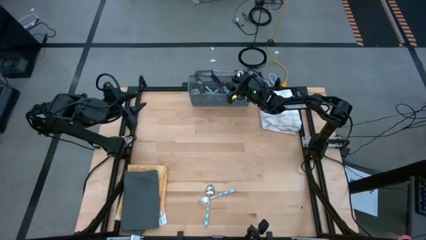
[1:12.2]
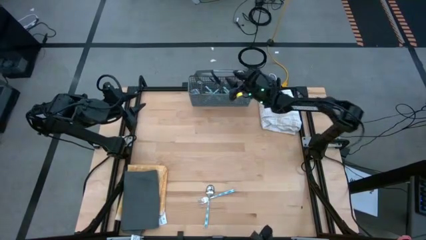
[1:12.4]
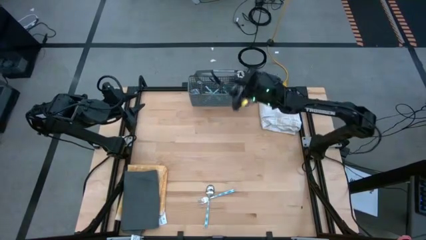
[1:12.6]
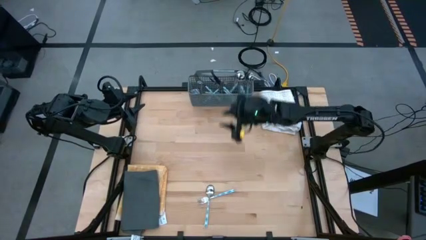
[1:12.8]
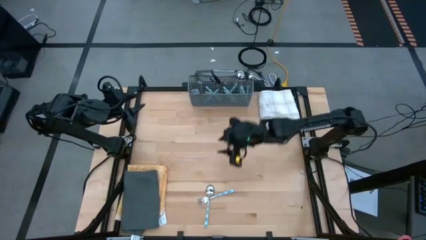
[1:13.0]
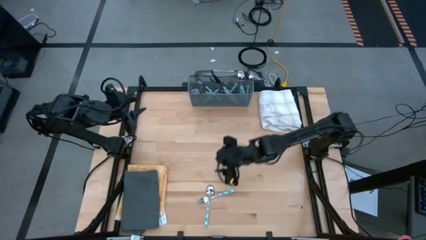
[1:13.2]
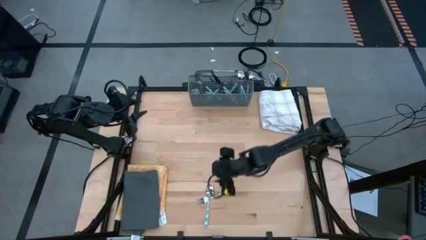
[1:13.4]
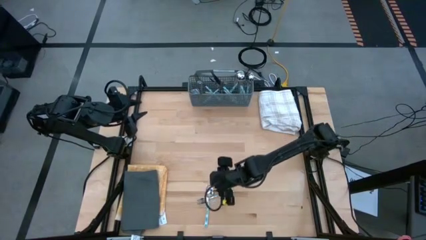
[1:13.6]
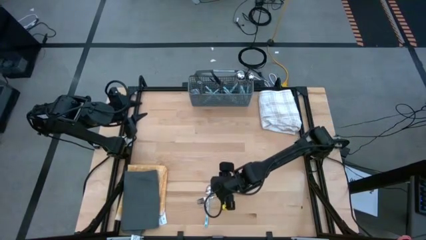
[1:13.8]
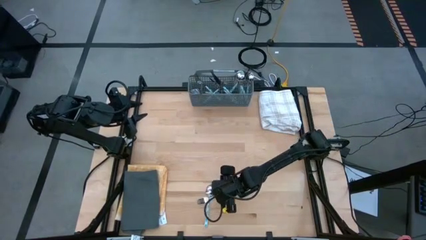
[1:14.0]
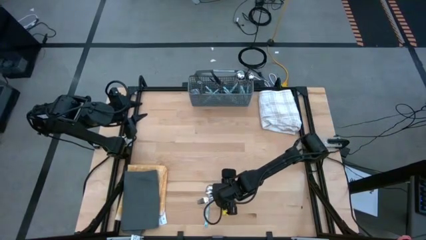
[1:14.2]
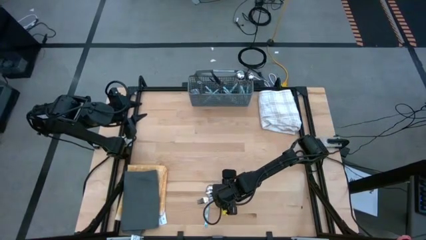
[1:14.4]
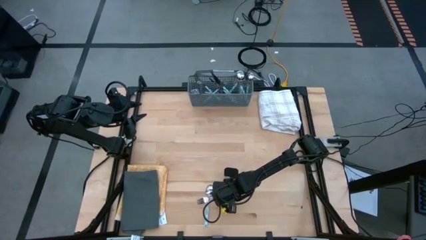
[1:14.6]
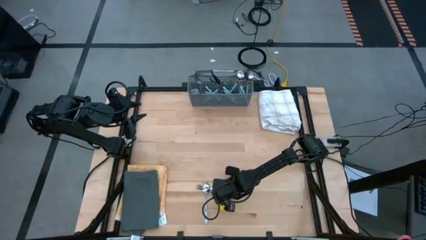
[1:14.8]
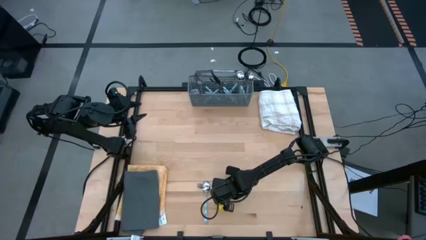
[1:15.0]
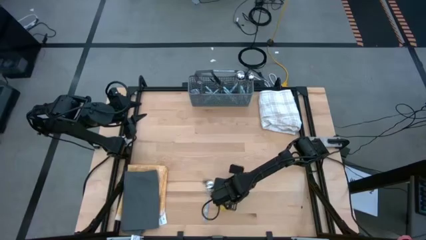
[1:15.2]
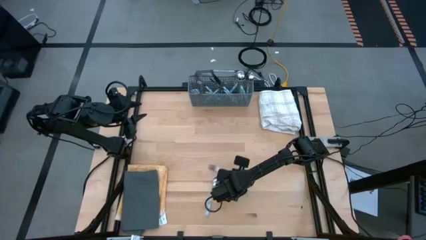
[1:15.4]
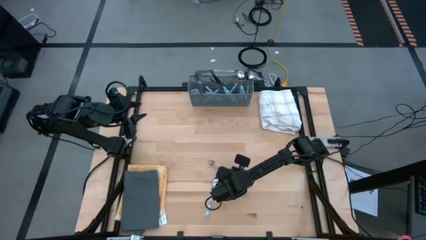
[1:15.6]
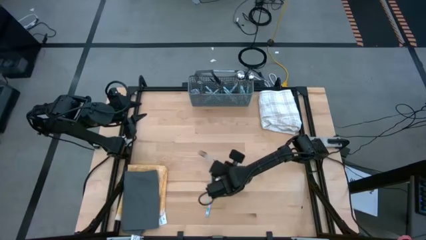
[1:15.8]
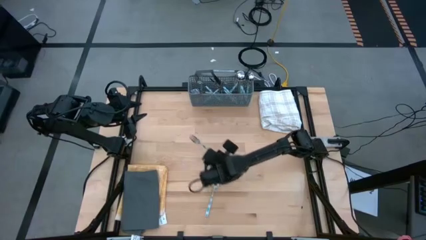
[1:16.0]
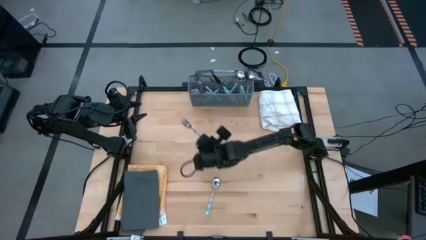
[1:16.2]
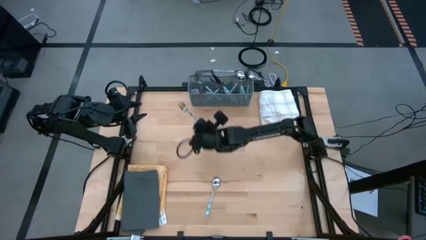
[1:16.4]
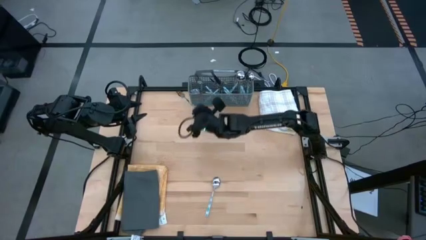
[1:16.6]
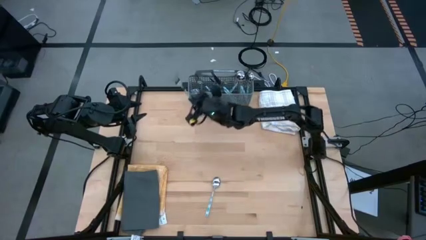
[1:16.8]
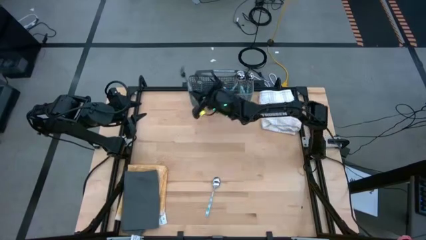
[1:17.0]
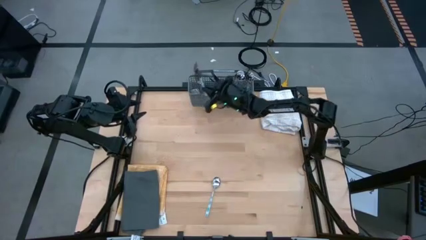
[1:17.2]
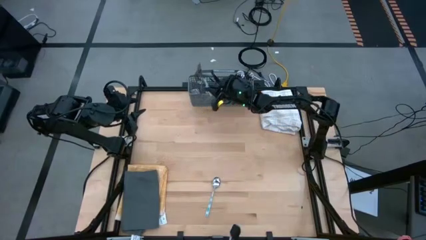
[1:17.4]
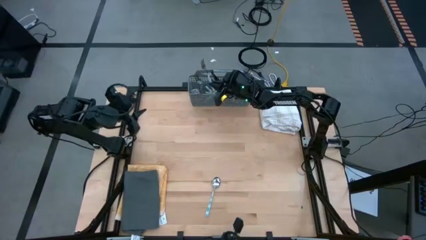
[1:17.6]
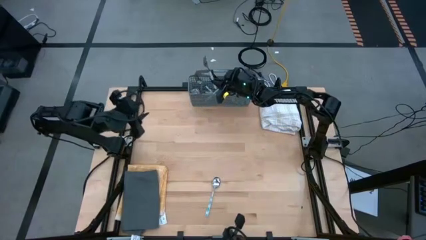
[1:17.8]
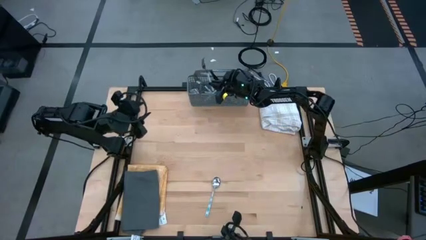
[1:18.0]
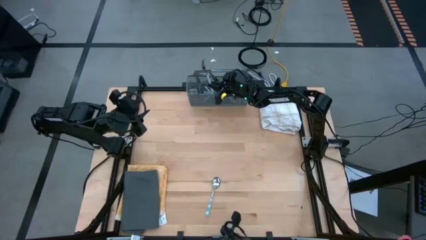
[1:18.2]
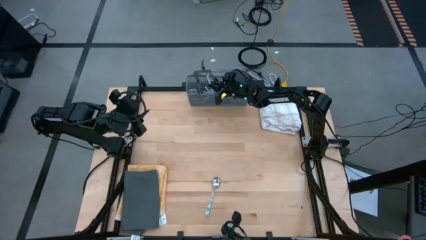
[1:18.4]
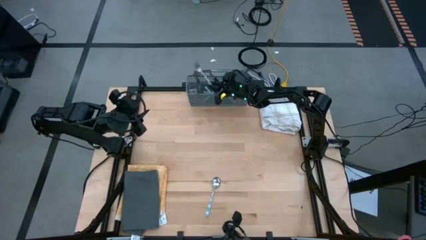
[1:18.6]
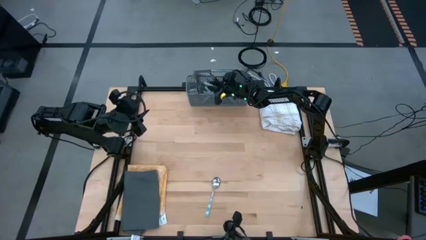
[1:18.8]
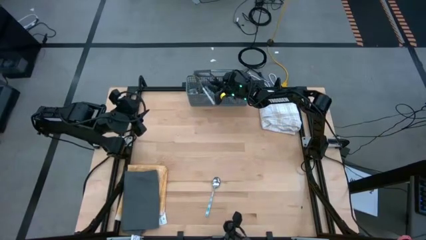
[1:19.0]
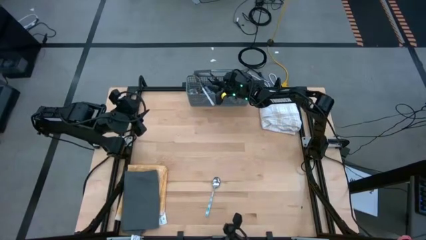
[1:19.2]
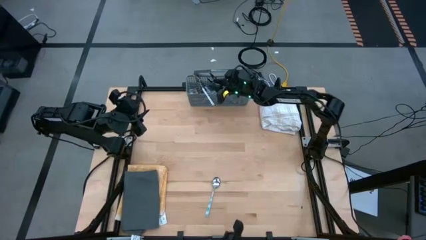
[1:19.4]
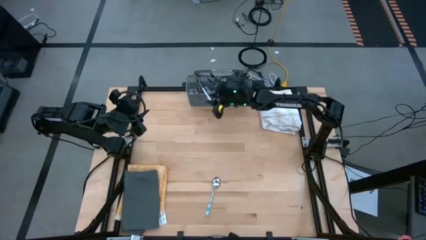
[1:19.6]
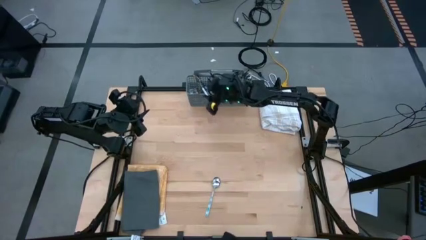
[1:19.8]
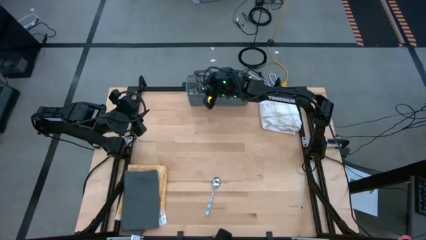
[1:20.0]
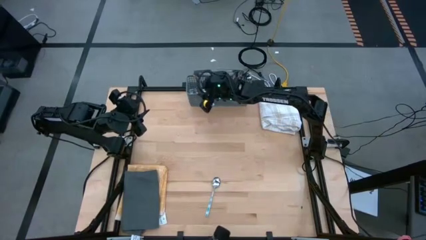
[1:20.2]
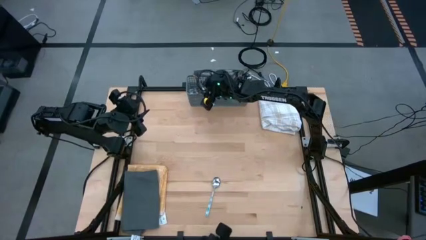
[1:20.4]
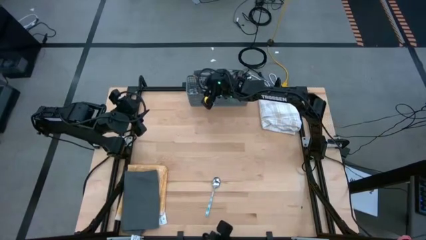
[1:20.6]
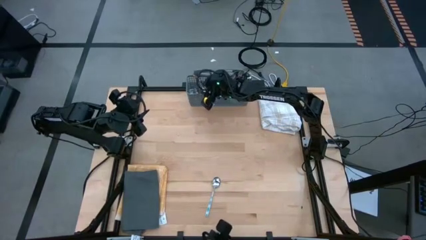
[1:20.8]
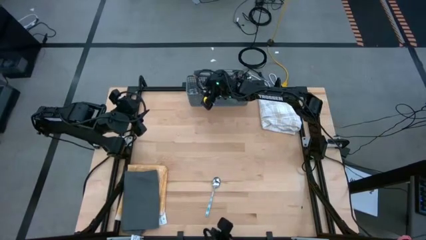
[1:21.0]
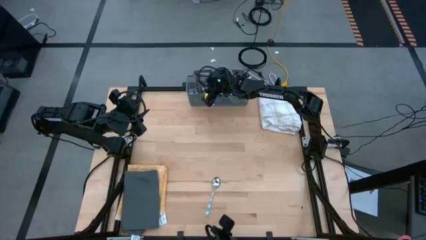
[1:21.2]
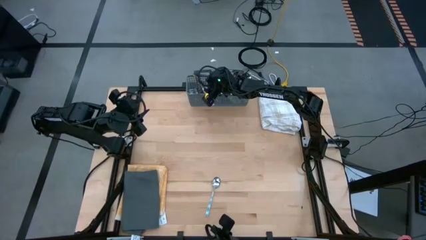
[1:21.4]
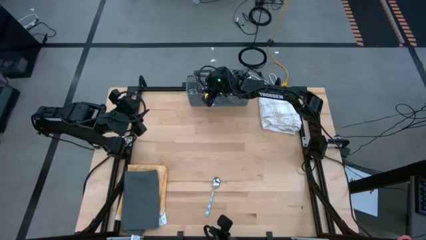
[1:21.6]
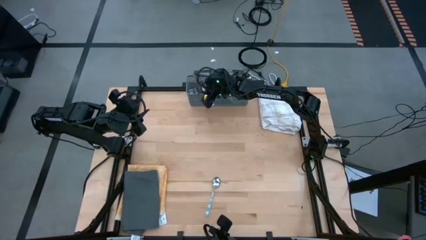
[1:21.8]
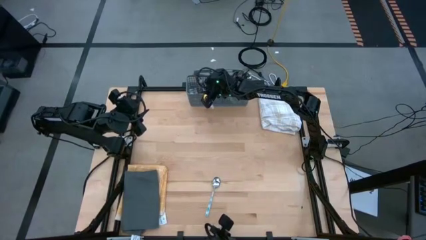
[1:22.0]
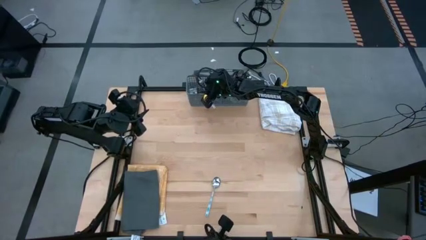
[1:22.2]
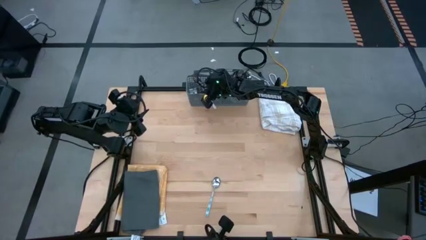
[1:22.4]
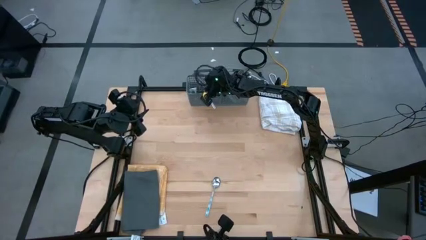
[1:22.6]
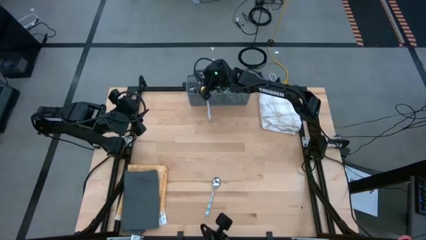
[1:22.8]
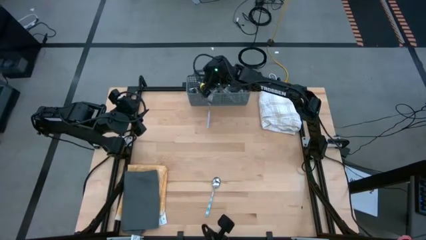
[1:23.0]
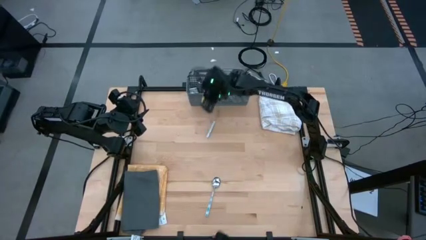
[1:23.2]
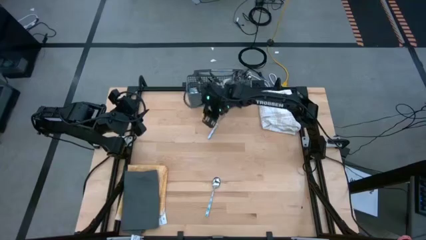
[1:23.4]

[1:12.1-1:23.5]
Task: Sort silverware
Put the blue fork into the gray silverware rack

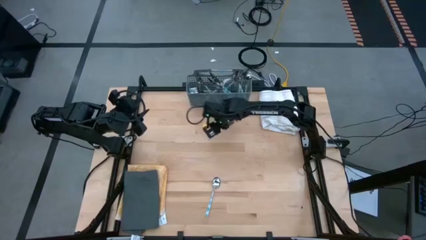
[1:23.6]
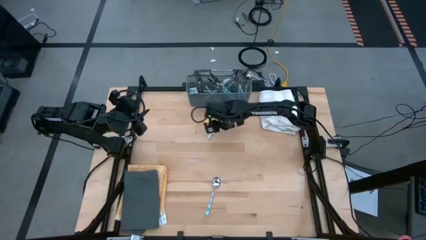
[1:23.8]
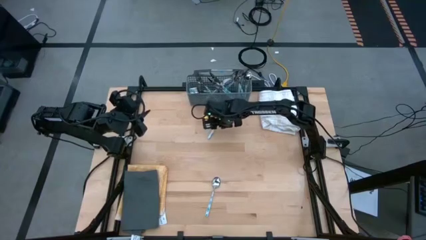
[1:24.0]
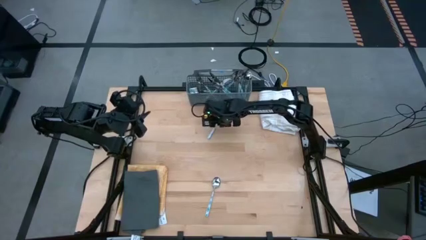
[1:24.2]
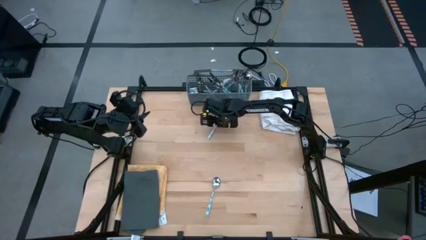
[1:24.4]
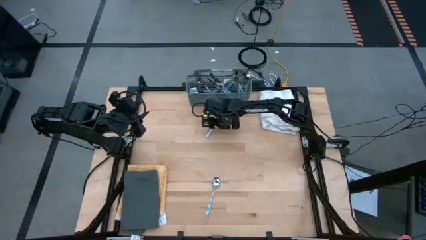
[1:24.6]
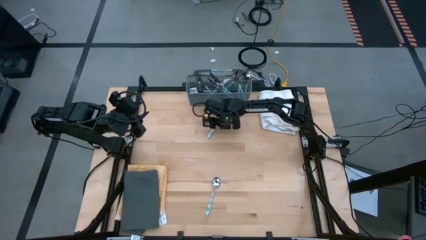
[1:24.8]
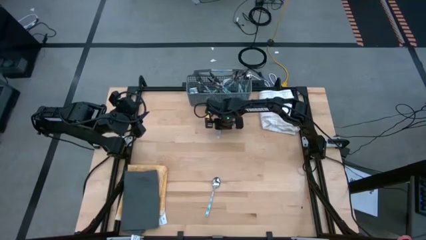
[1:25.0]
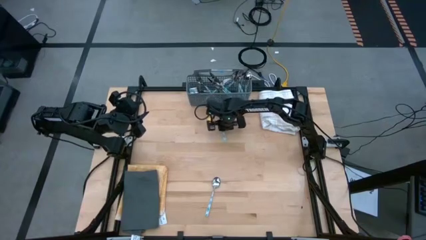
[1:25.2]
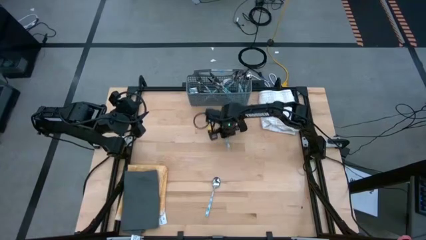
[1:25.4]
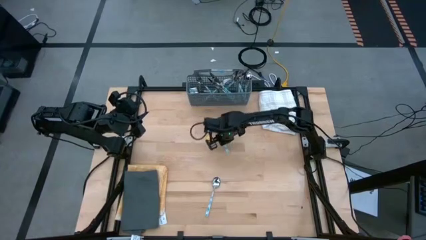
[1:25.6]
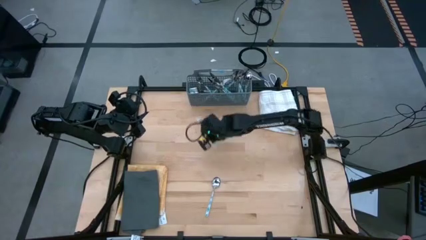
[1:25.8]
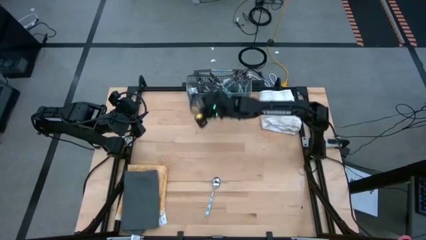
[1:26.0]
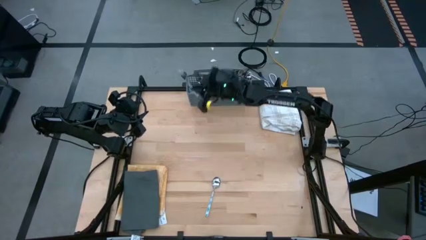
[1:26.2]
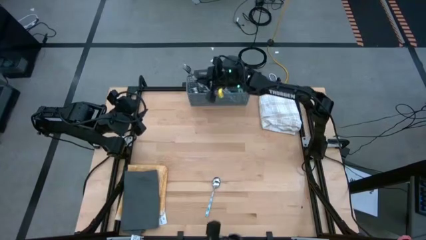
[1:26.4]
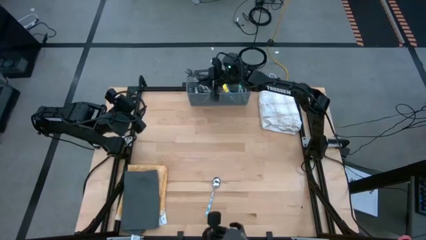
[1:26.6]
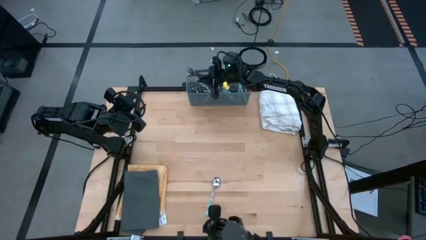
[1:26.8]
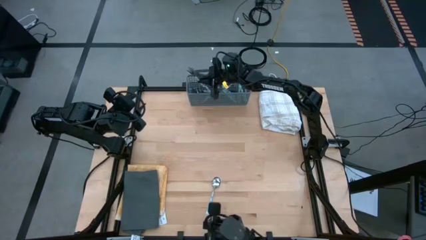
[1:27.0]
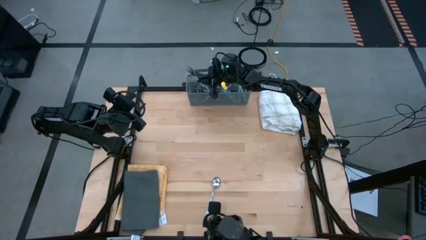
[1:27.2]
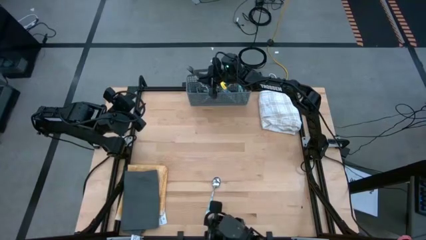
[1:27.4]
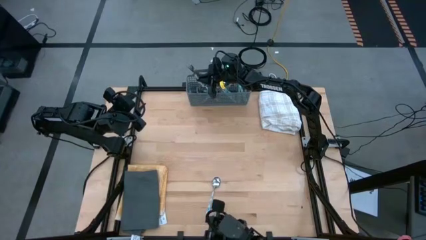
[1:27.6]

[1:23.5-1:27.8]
Put the blue fork into the gray silverware rack
